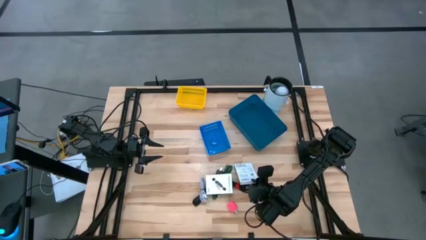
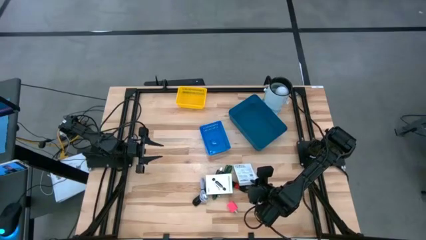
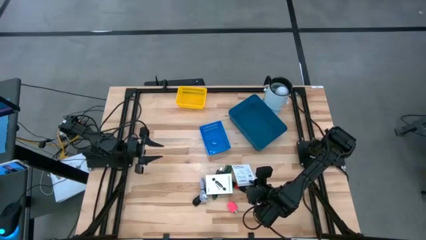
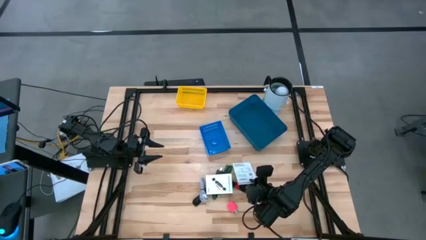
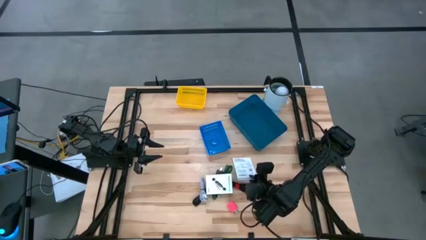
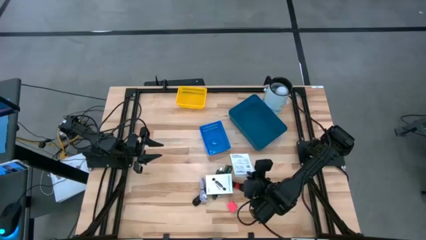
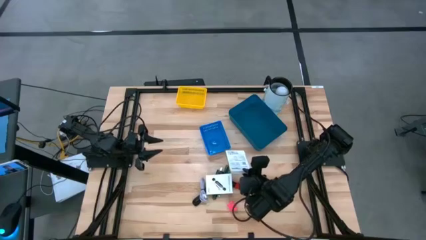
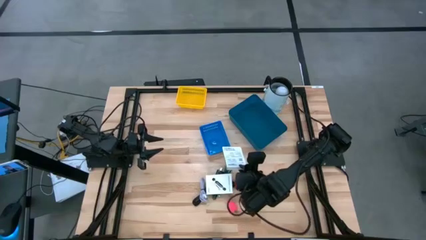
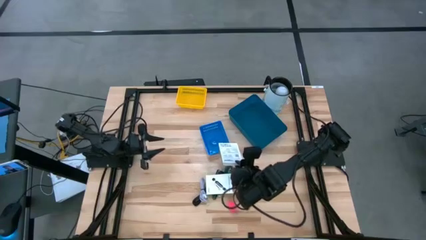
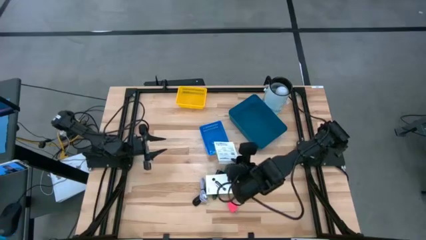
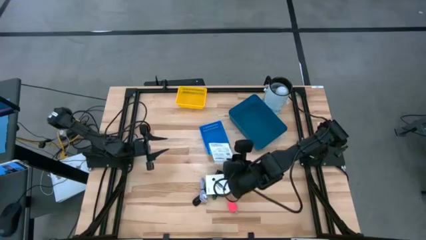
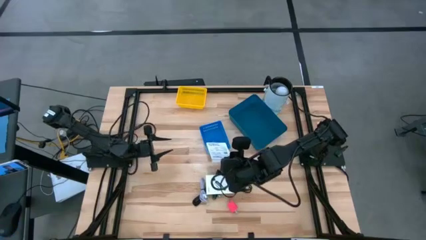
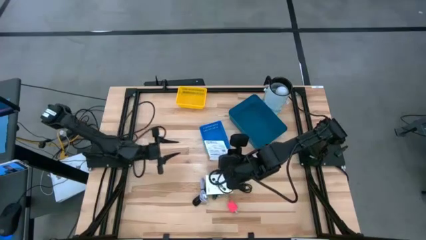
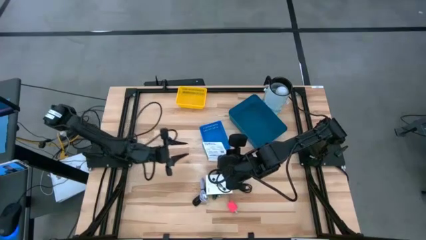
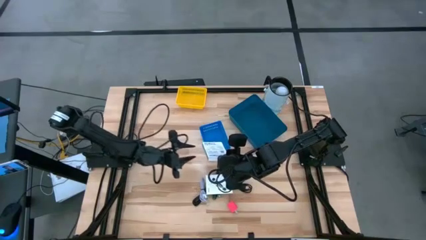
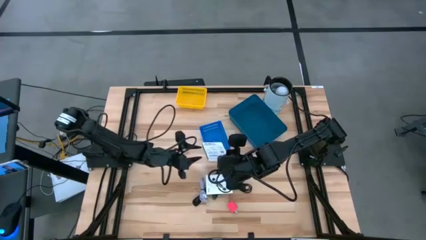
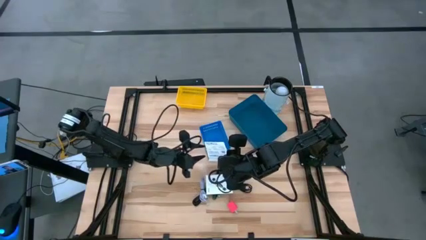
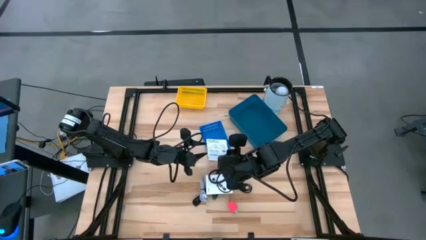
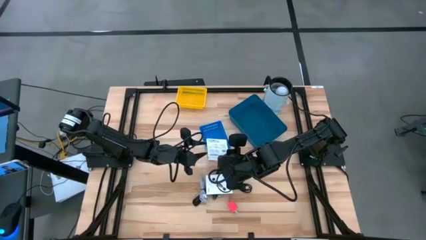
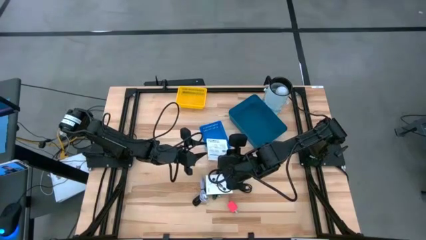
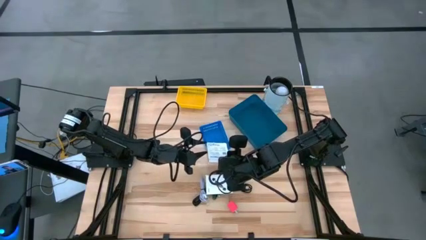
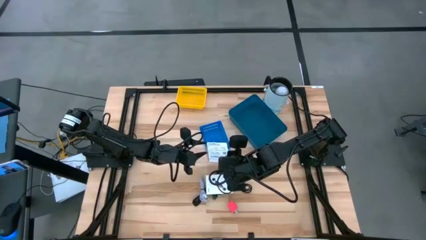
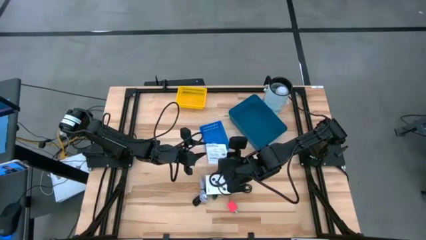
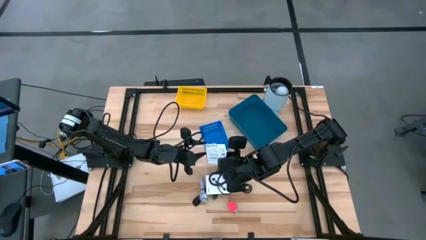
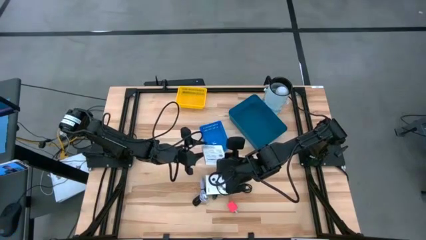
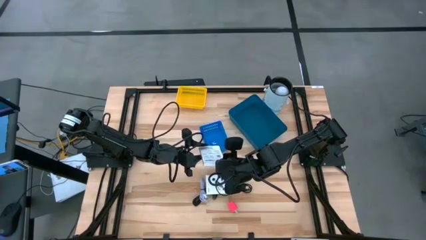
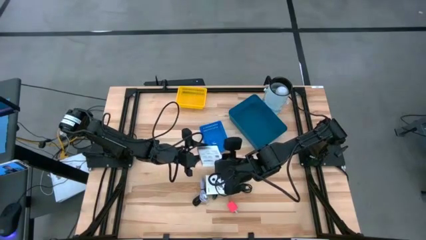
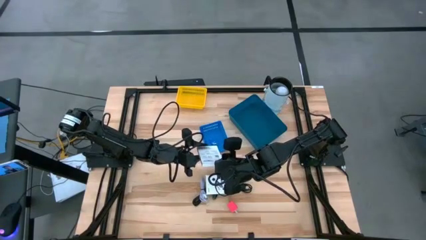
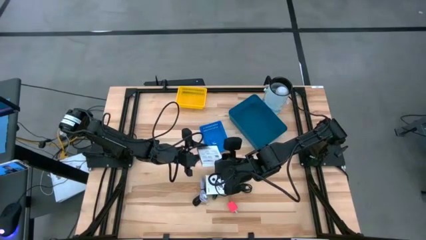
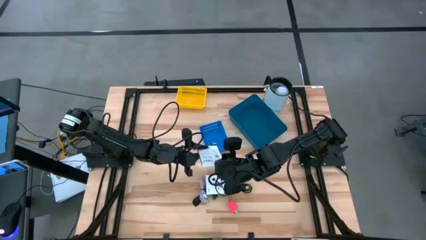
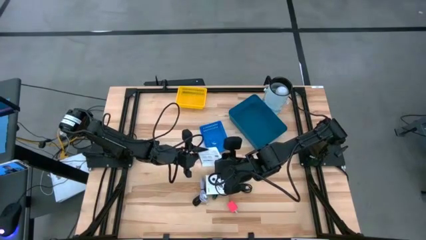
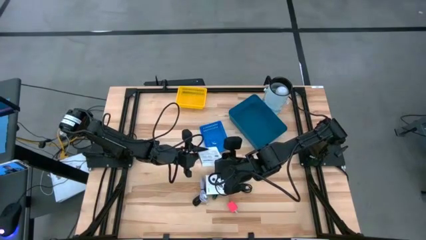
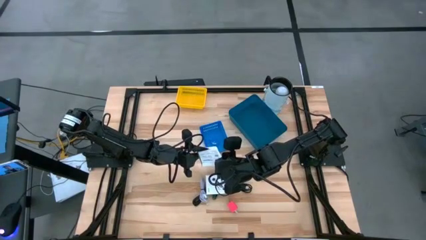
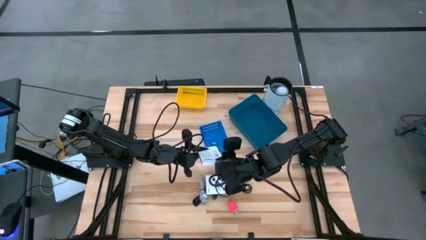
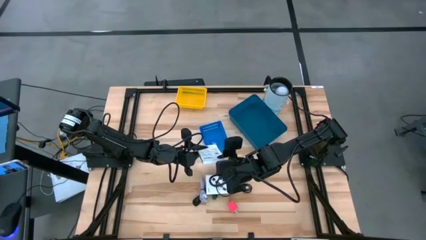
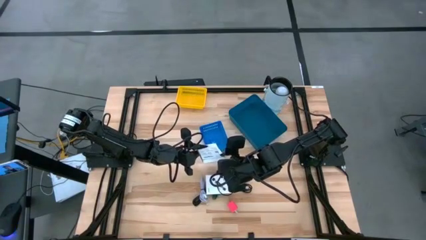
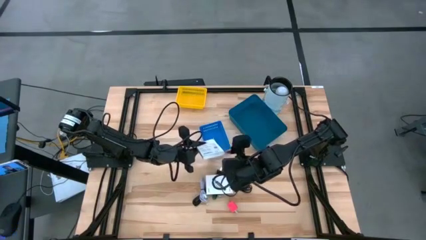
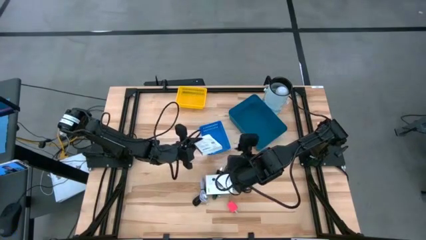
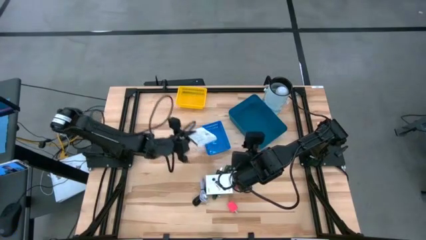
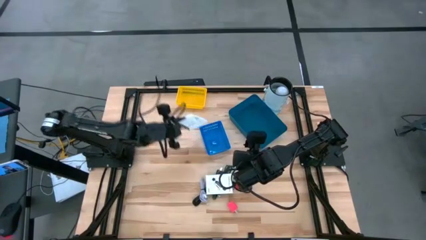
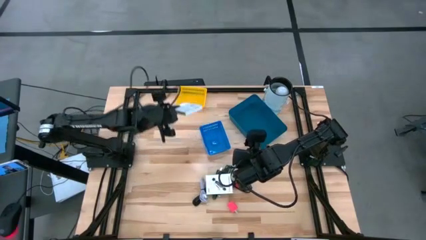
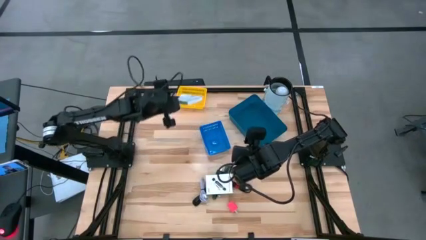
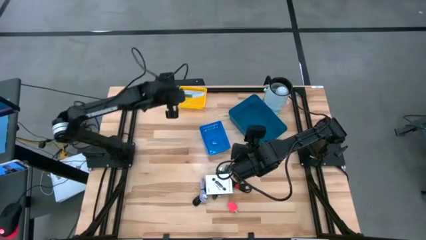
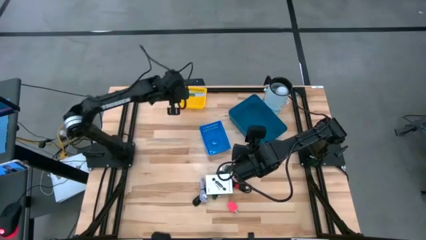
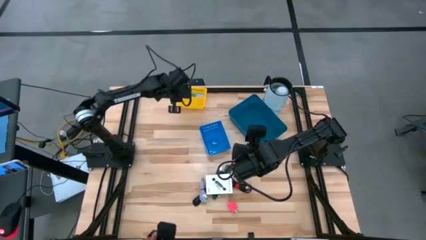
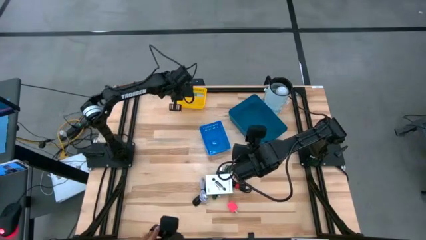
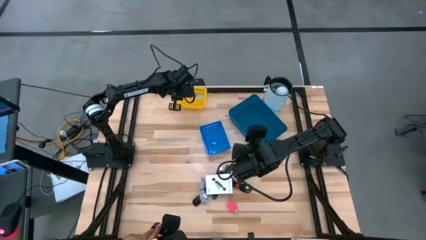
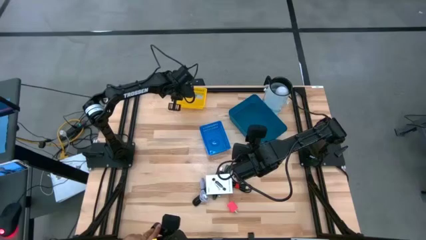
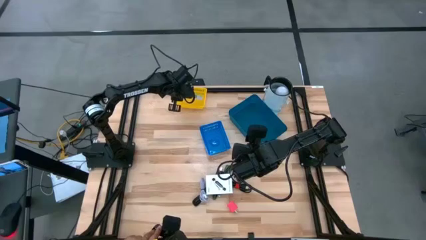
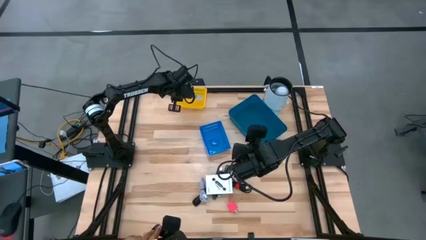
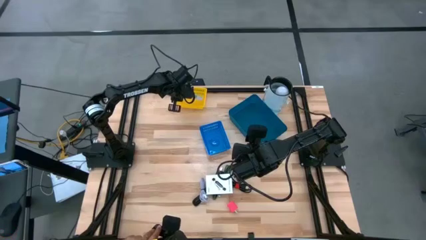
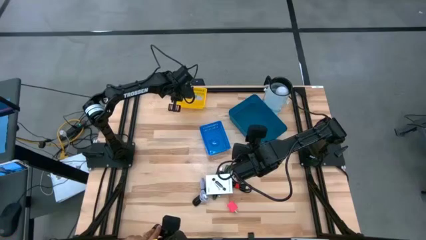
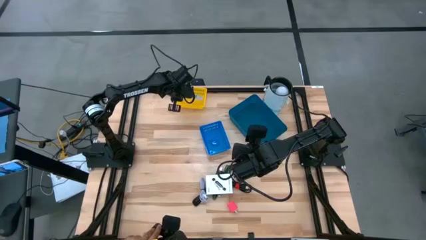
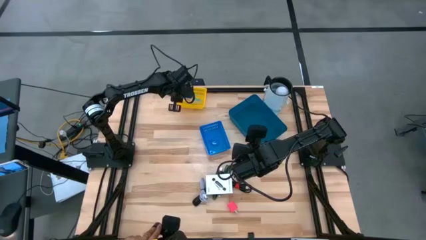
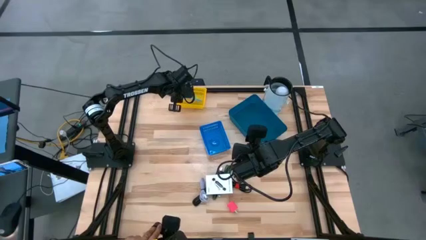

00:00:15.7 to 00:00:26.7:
Task: Pick and place items into bin
Put the white card reader box into the yellow bin
